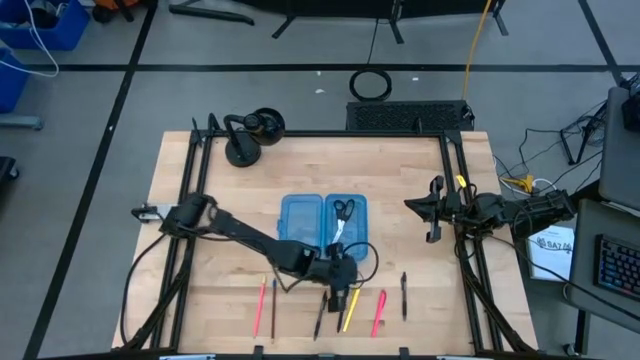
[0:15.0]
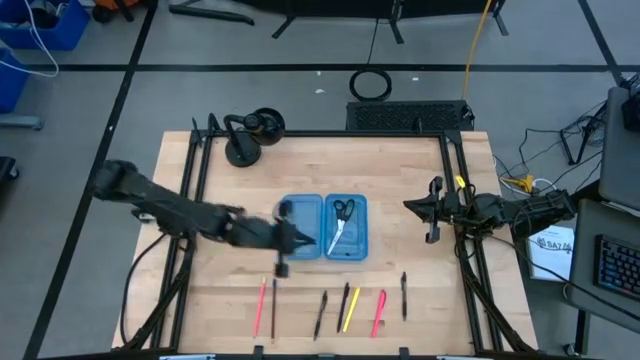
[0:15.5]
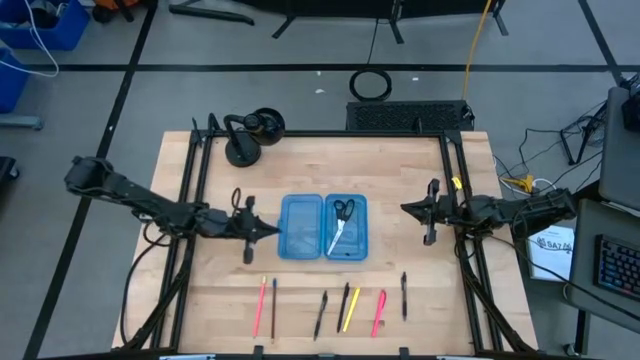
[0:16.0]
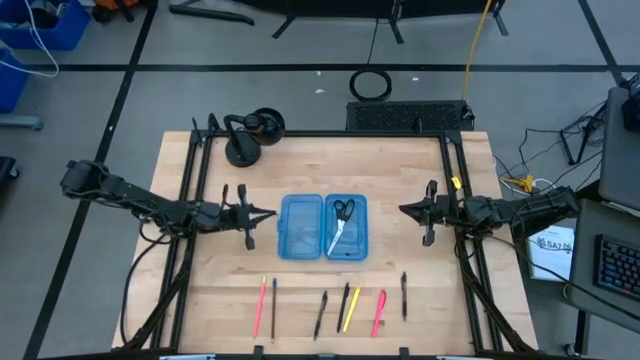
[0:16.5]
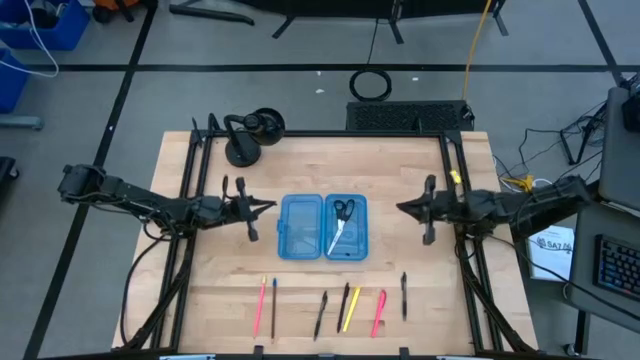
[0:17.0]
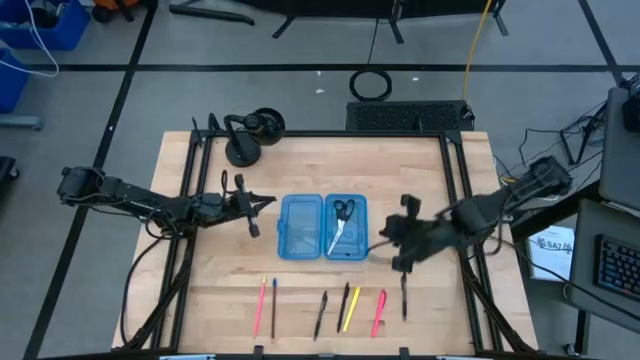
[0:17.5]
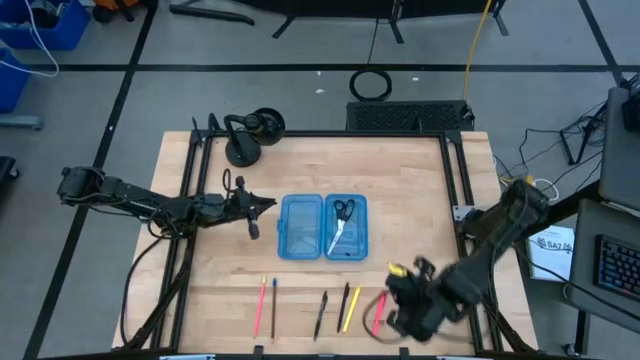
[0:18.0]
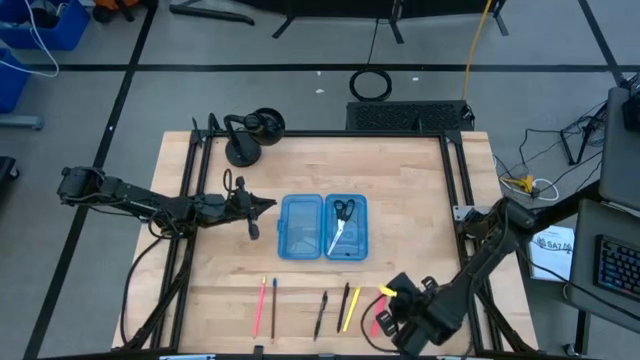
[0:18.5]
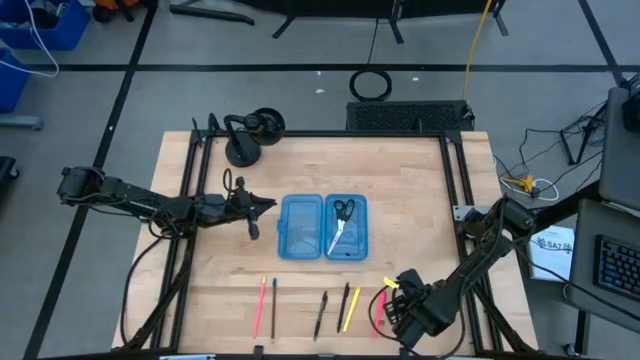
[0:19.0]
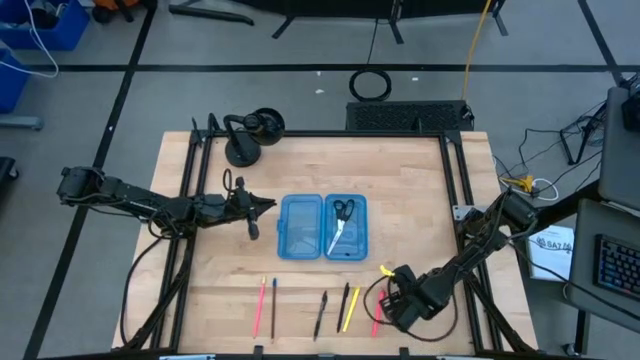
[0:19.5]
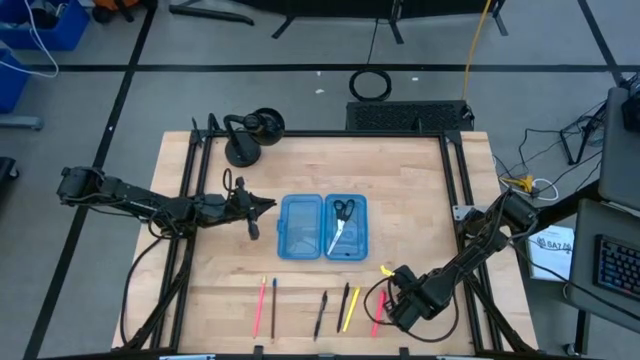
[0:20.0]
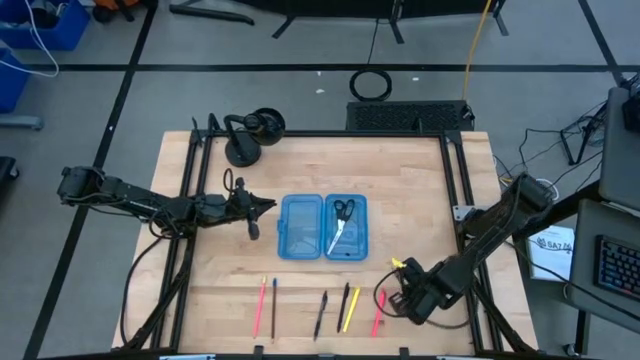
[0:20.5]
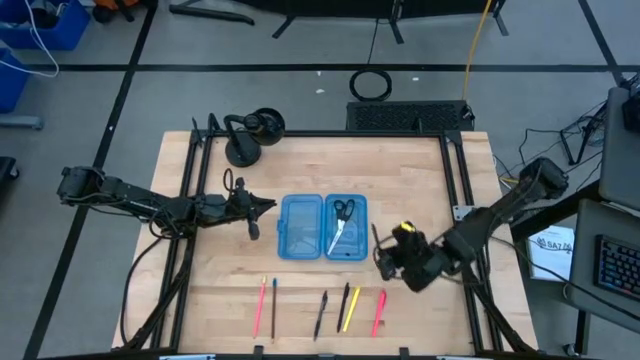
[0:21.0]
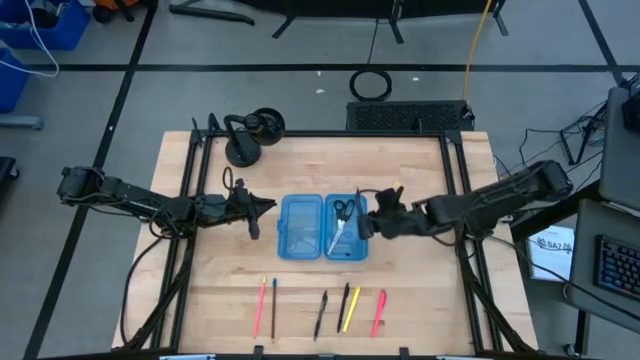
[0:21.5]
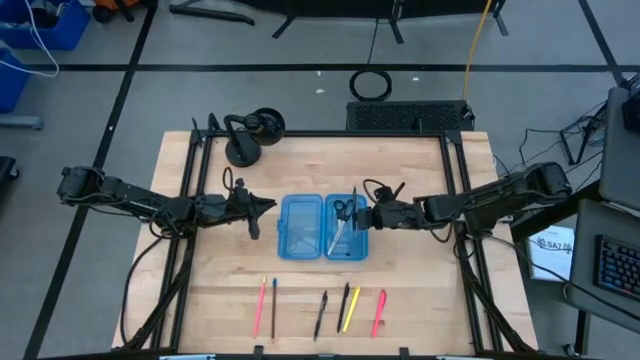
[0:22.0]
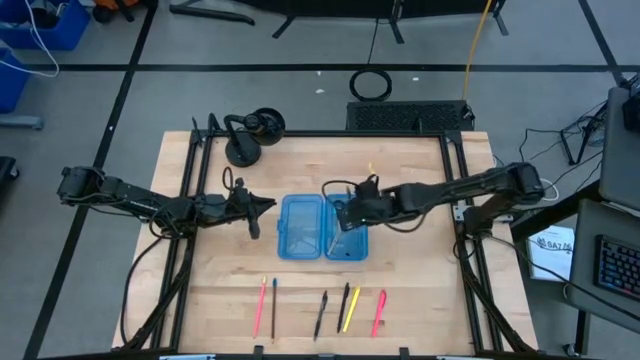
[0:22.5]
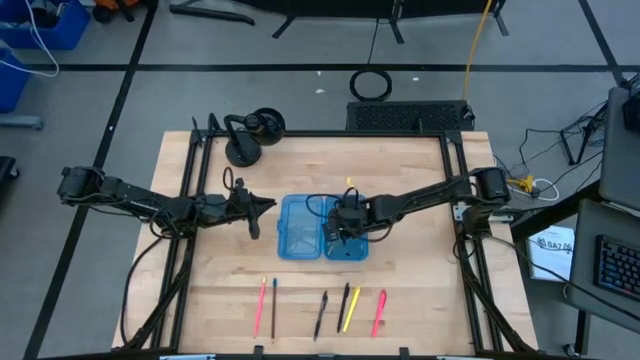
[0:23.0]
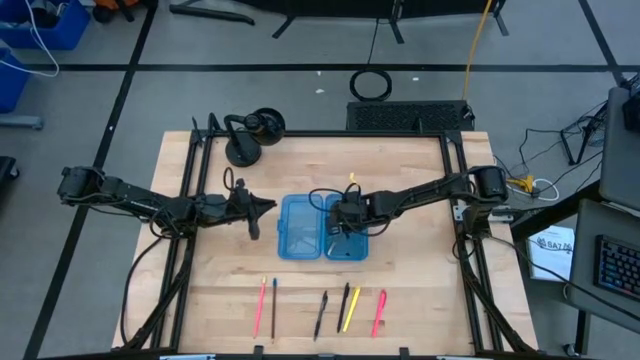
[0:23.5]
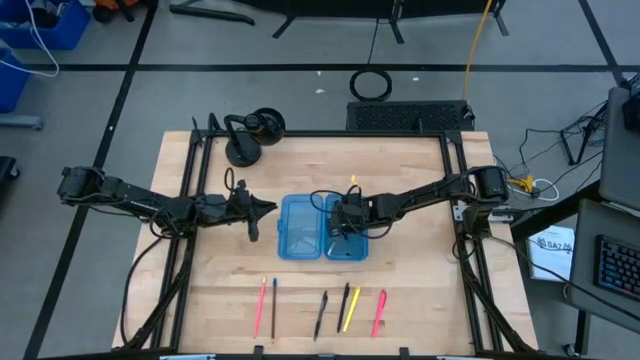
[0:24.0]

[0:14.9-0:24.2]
Task: Pick & place school supplies into a supply box
Put the right black pen into the blue supply box

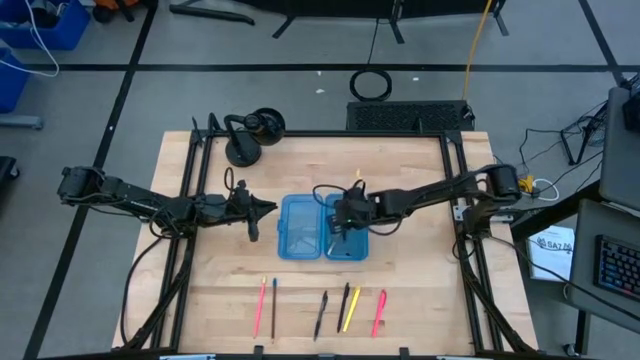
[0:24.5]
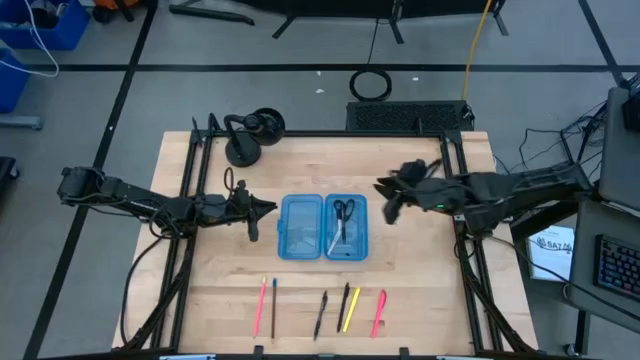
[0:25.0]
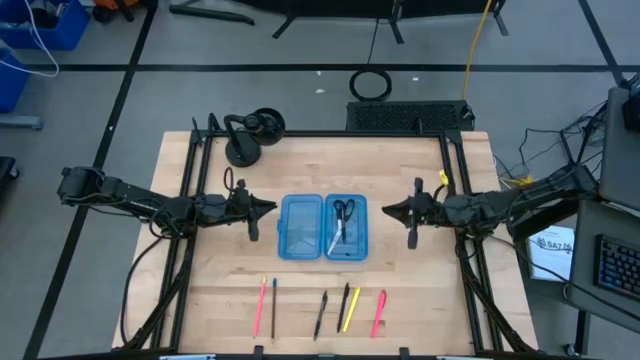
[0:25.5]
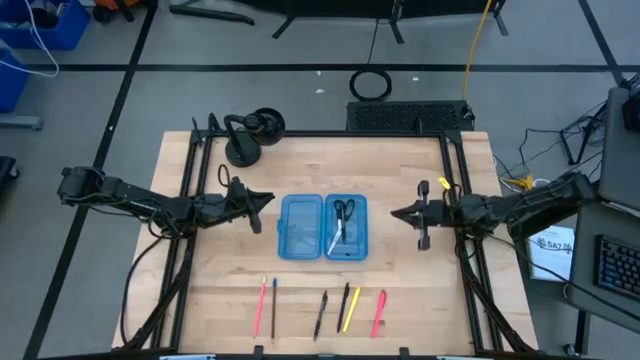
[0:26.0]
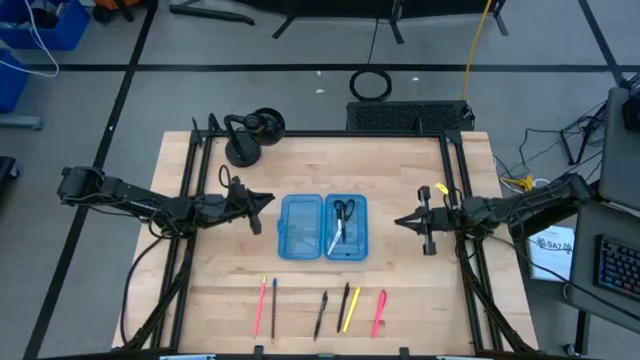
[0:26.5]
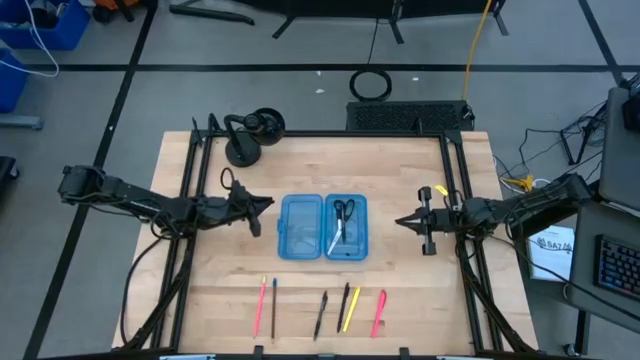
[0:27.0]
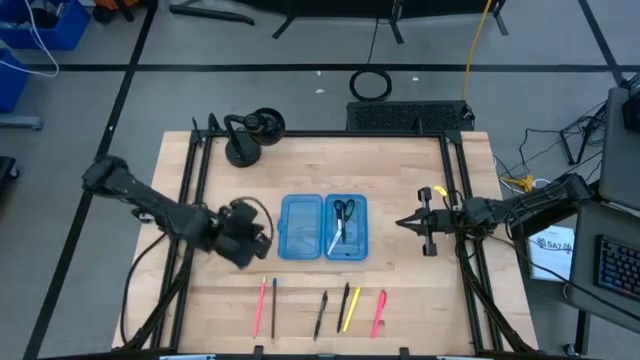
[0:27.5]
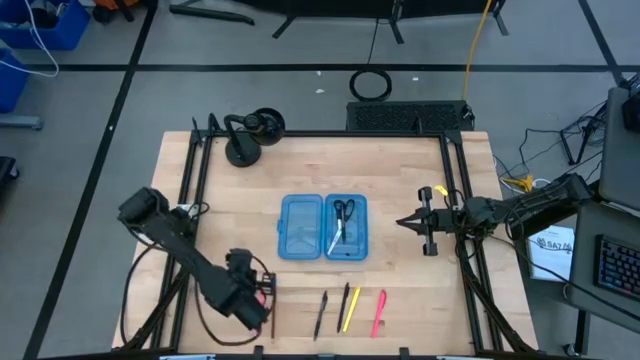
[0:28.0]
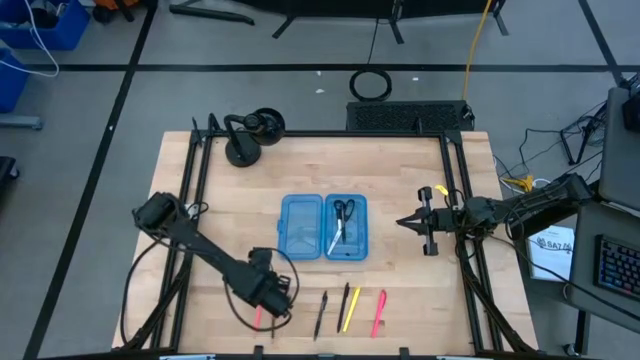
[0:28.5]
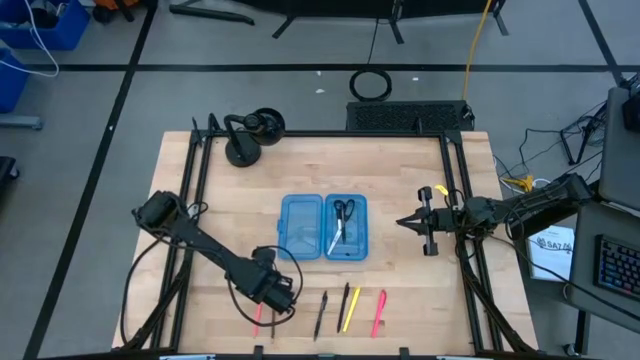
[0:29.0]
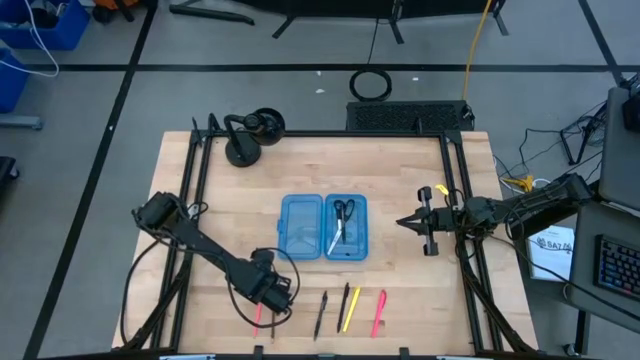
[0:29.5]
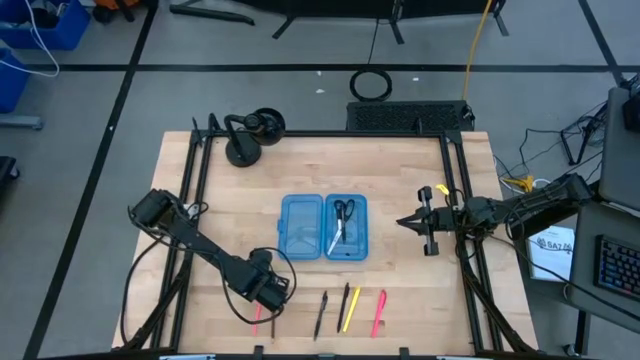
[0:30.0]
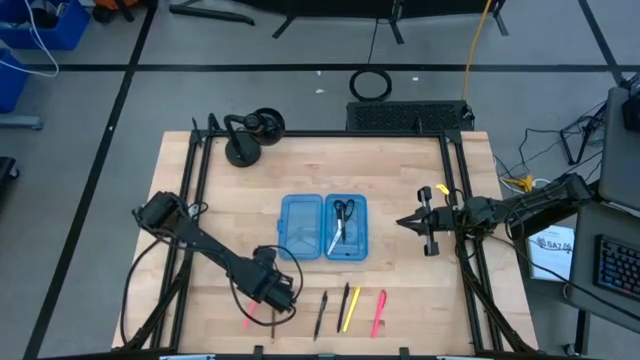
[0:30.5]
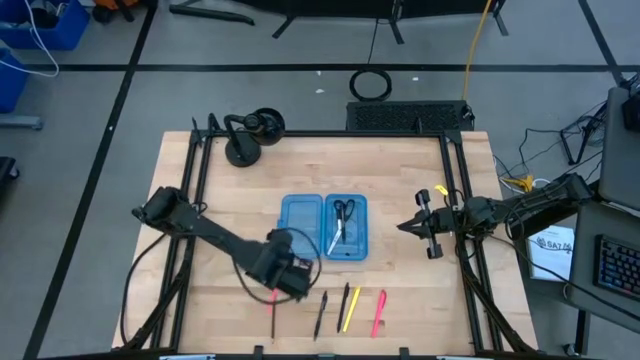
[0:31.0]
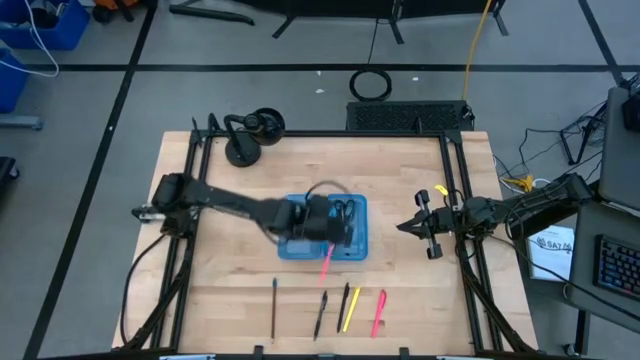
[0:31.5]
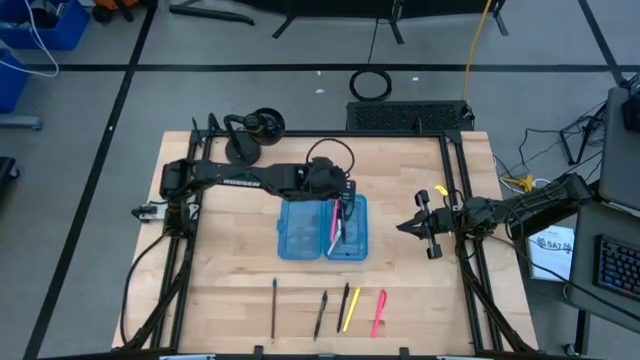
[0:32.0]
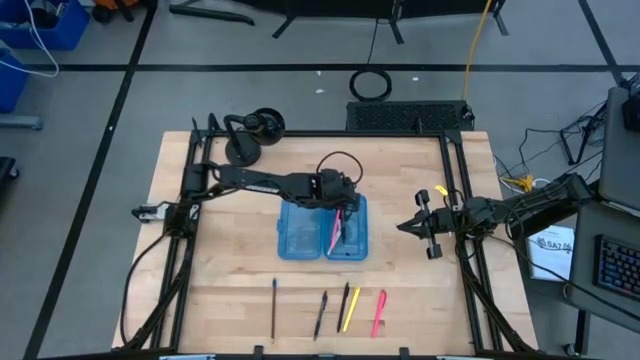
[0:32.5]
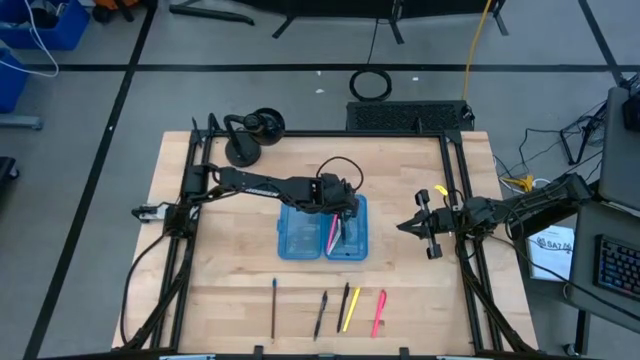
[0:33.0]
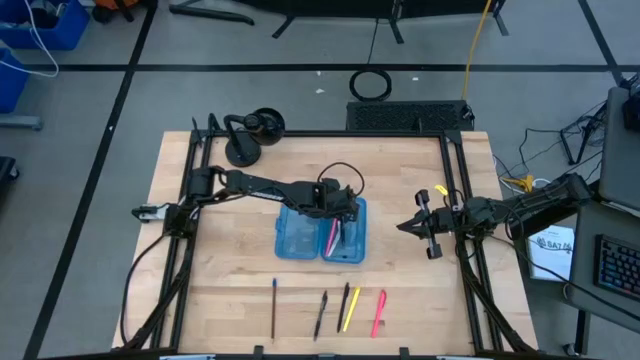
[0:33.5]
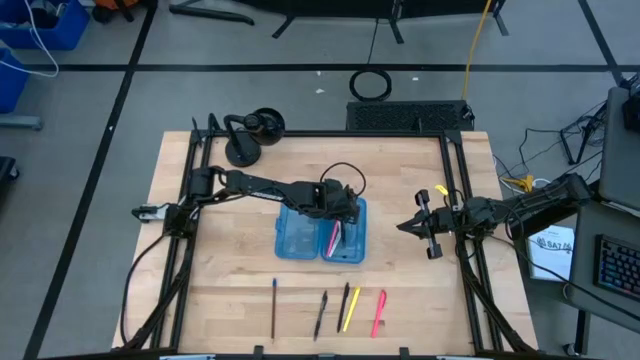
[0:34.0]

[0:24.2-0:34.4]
Put the pink pencil into the blue supply box
